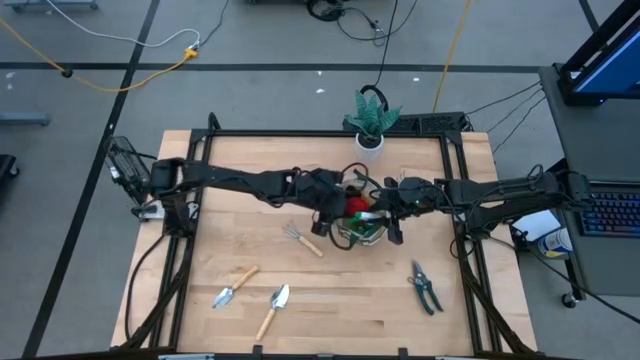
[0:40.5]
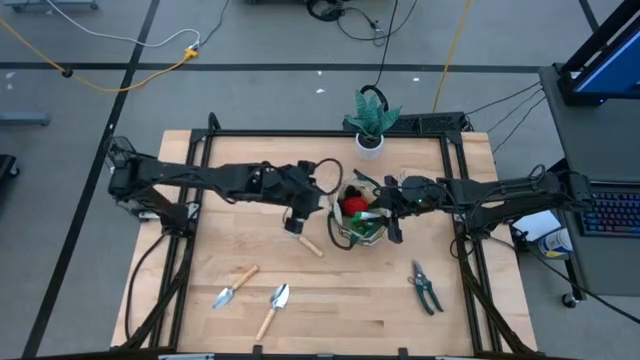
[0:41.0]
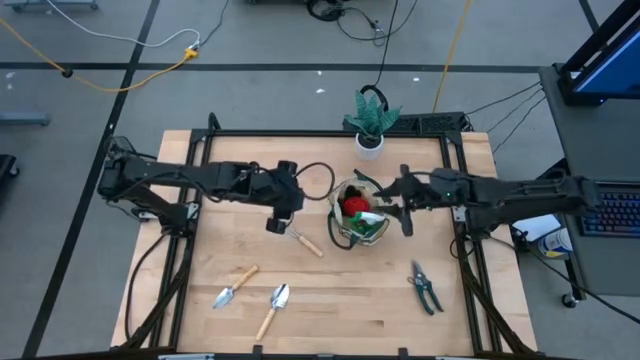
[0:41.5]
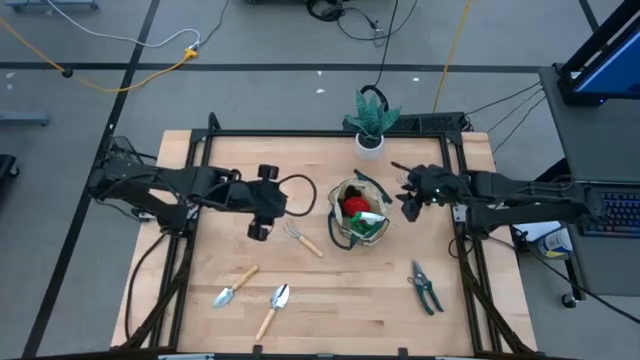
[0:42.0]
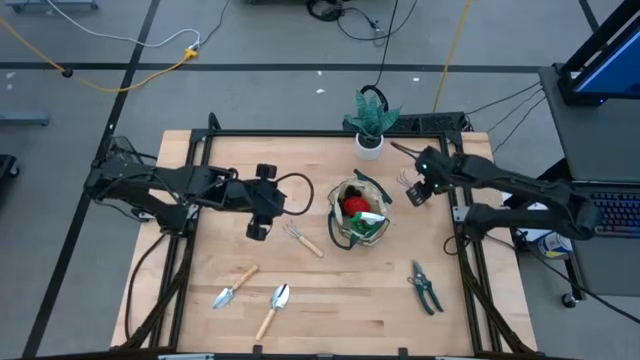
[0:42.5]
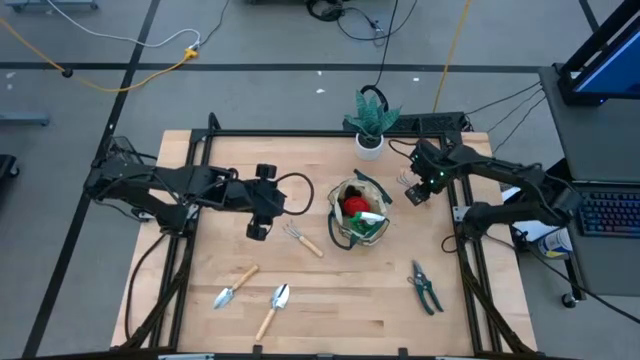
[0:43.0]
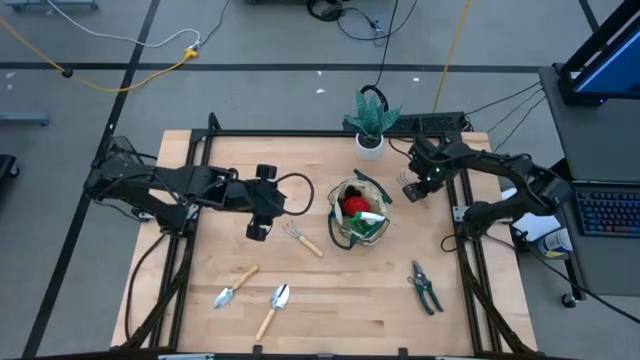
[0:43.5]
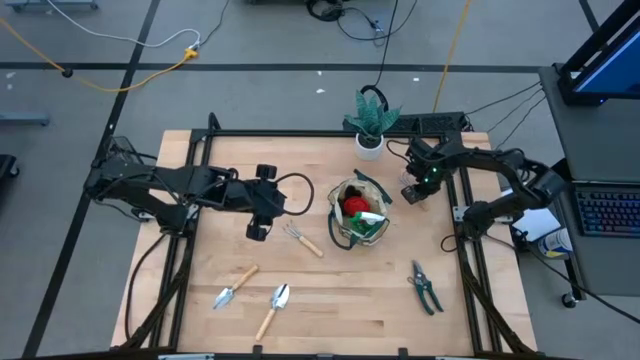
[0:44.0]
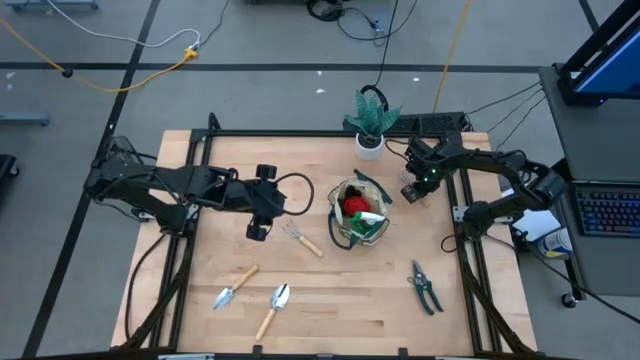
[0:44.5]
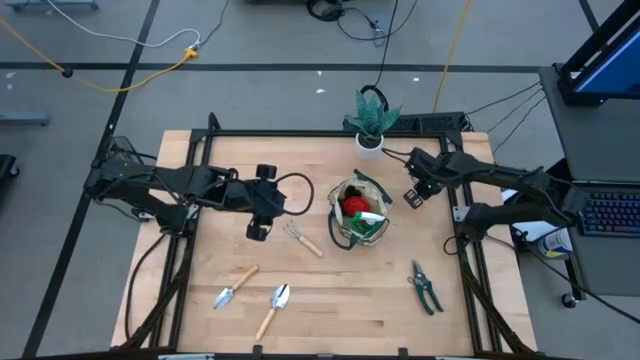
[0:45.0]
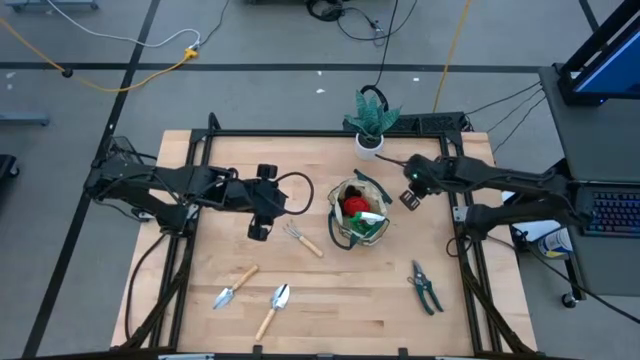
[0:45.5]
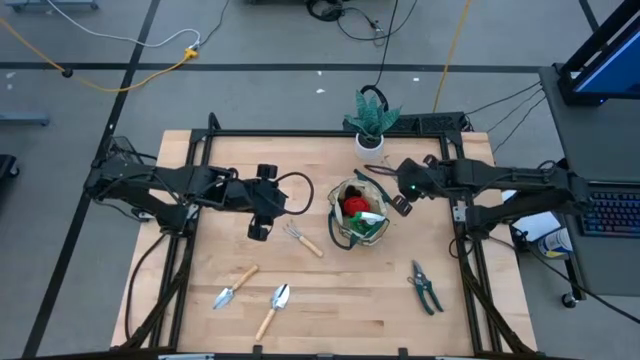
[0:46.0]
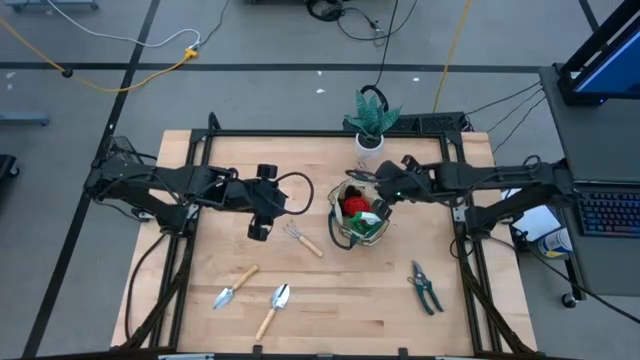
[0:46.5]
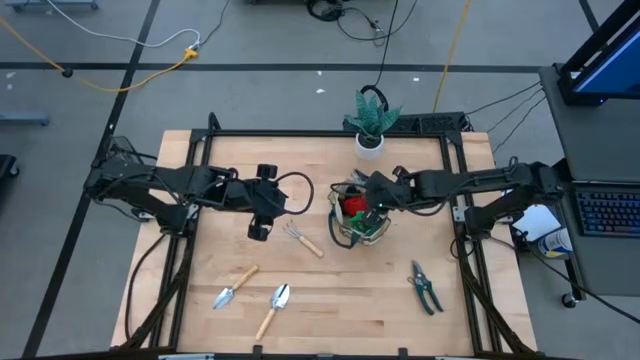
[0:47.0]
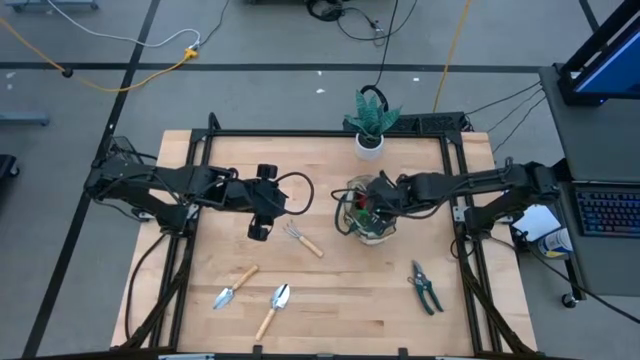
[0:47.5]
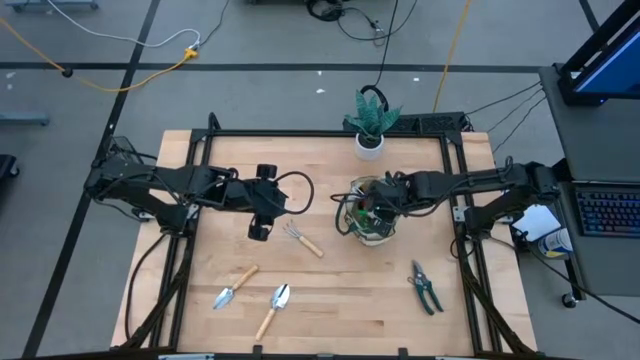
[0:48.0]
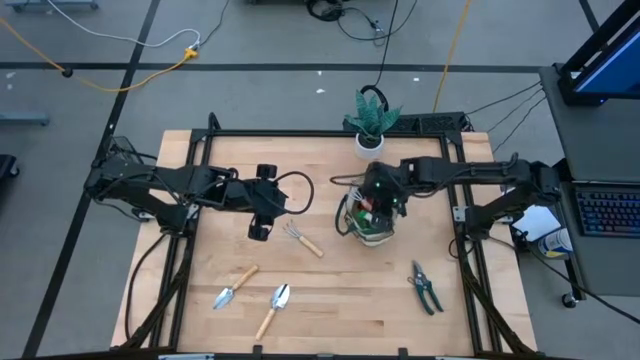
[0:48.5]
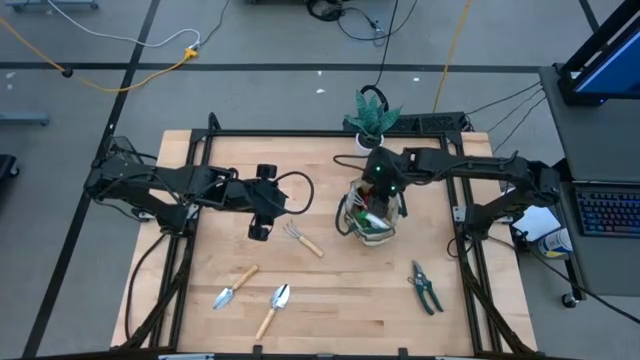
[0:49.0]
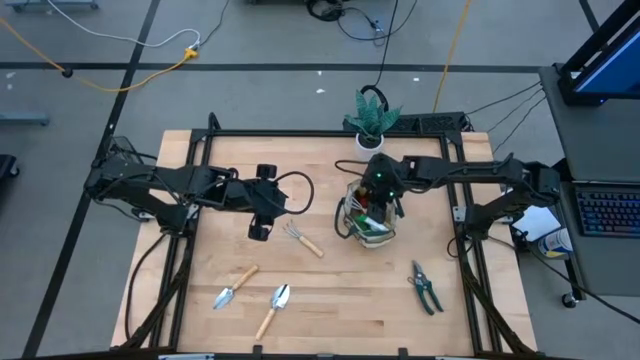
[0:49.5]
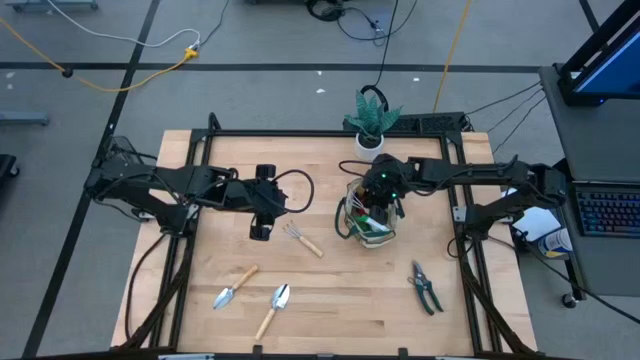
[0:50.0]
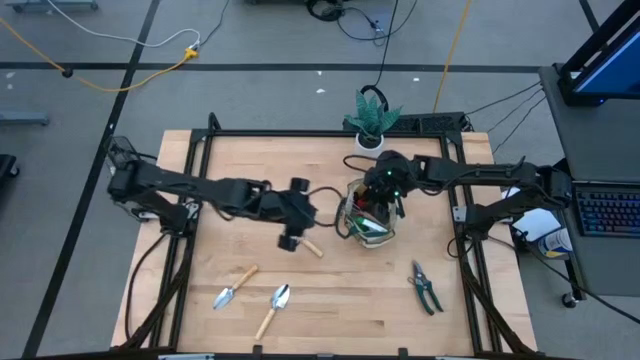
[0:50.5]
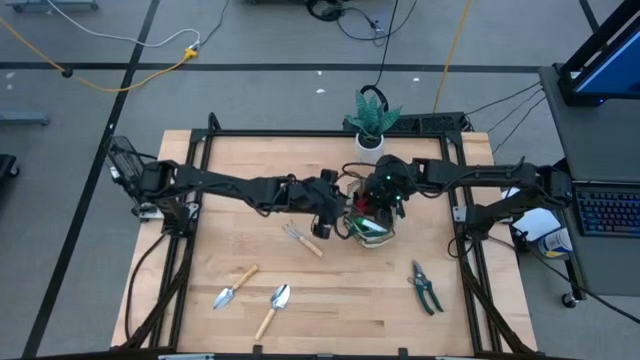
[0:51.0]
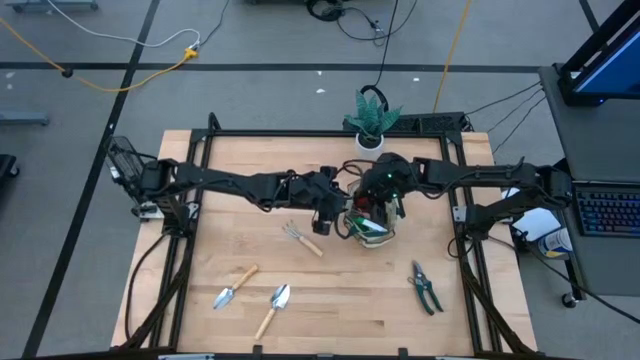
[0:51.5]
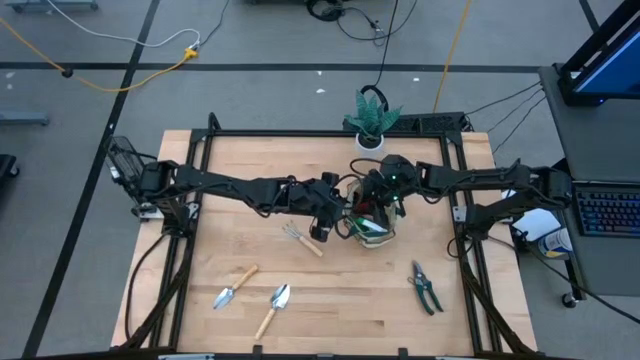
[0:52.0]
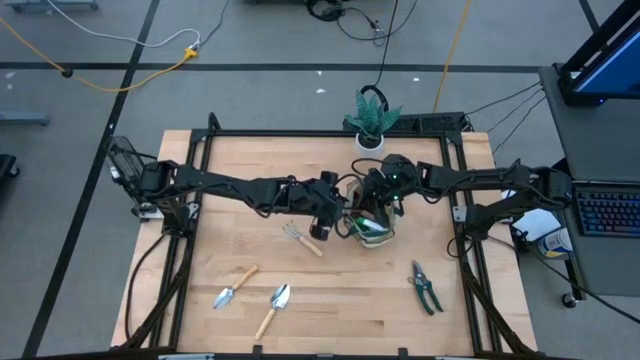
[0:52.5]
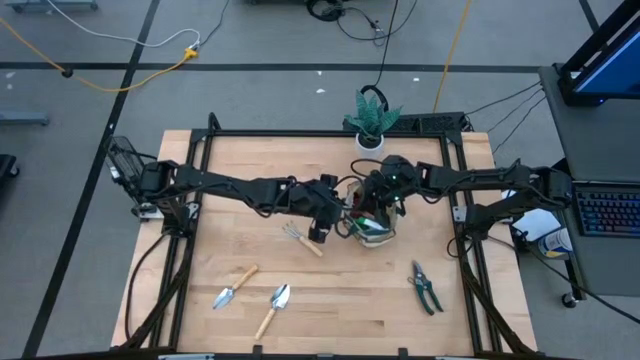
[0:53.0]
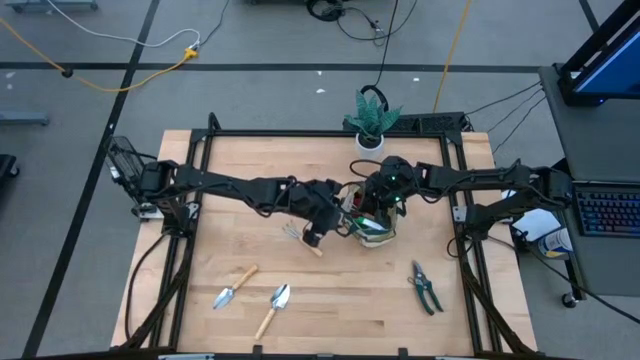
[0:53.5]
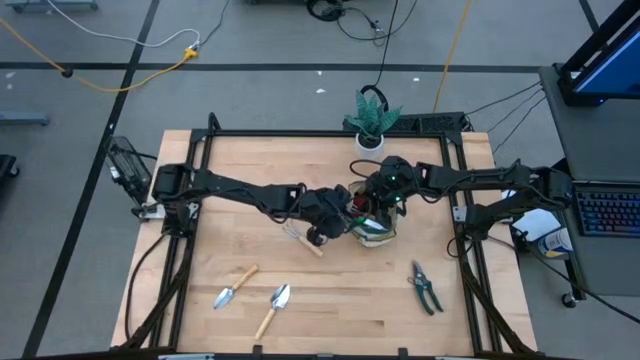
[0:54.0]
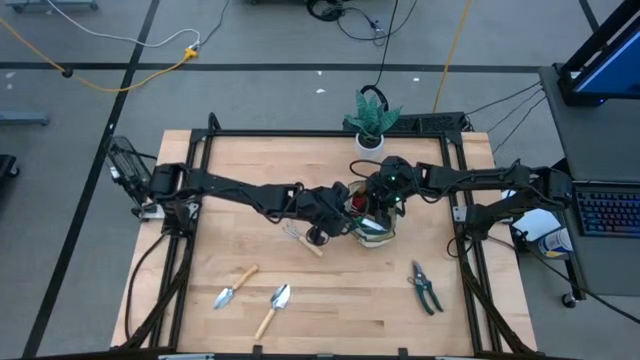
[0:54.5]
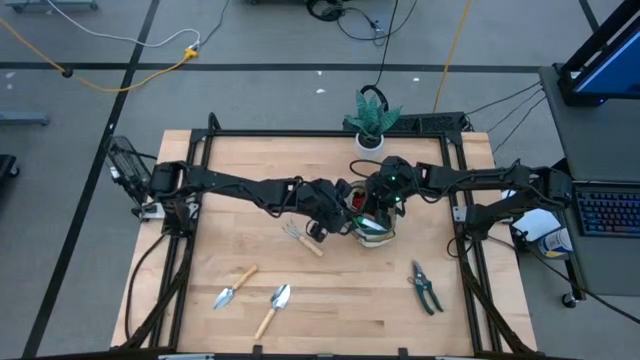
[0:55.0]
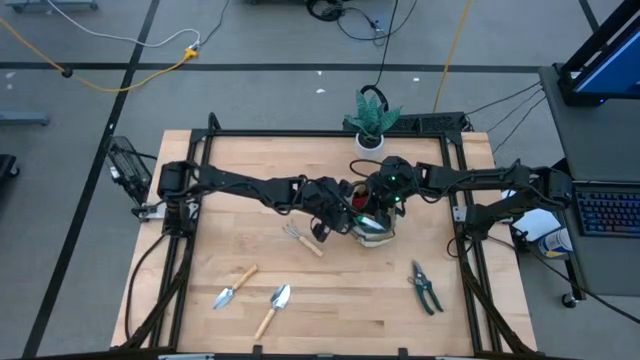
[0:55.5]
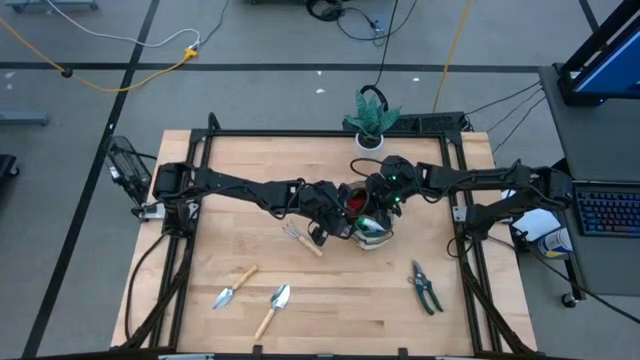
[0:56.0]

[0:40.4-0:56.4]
Task: Pick & Place Garden tools in Gardening bag
Put the right brown hand rake into the gardening bag

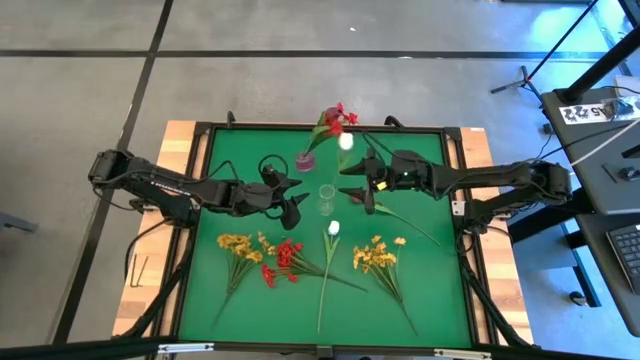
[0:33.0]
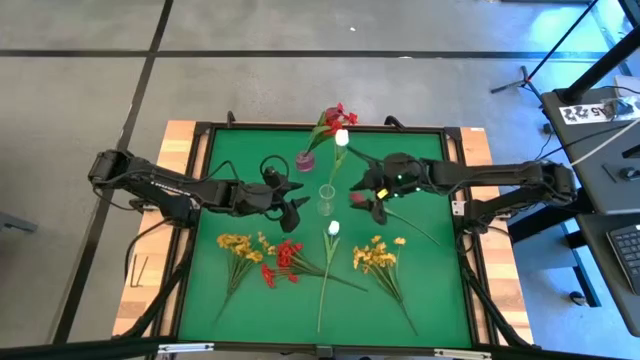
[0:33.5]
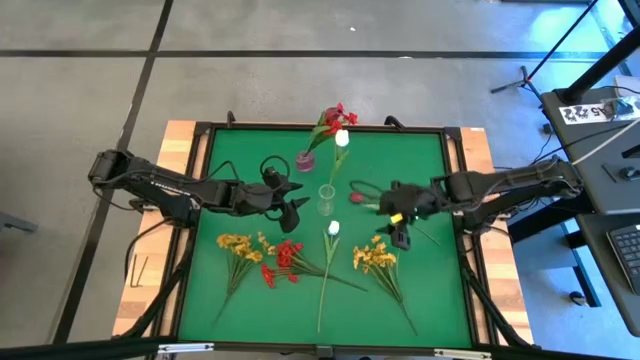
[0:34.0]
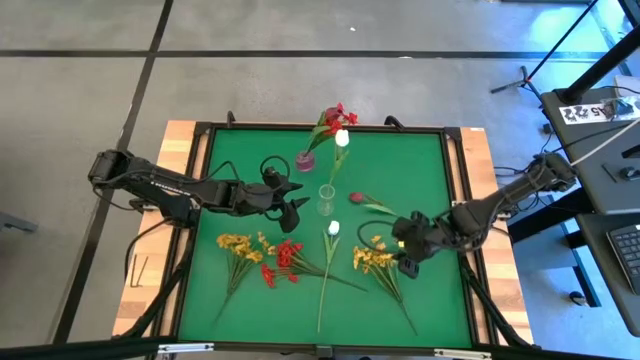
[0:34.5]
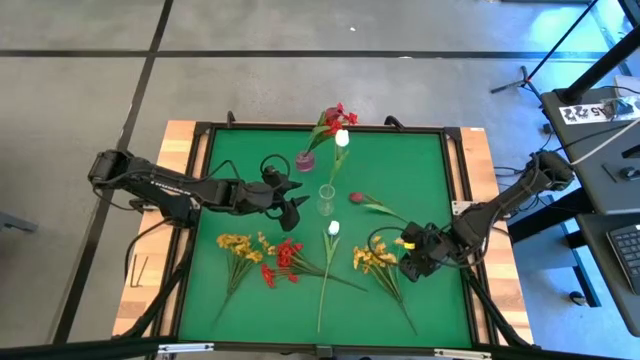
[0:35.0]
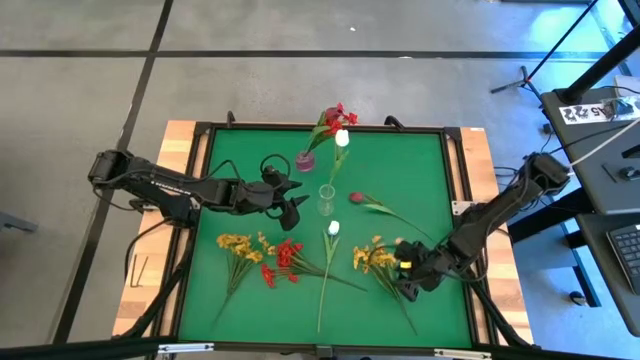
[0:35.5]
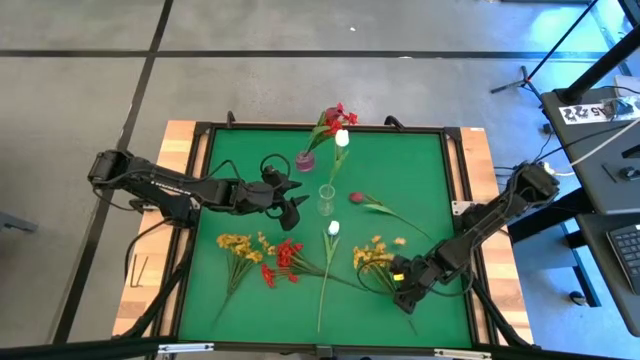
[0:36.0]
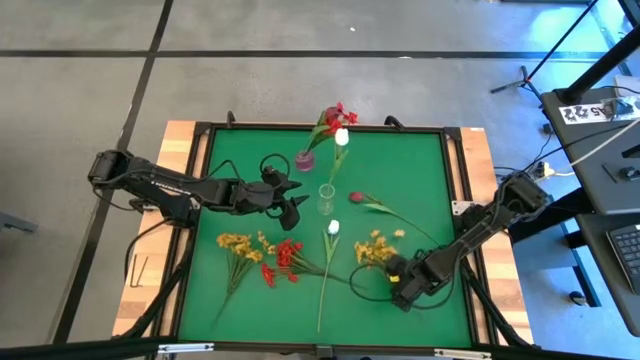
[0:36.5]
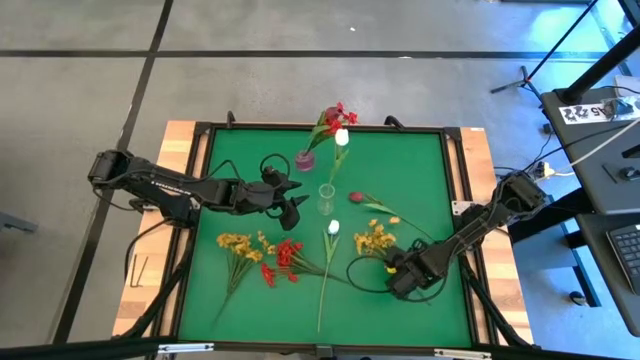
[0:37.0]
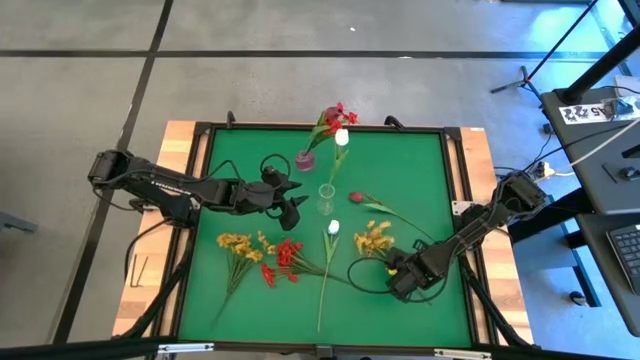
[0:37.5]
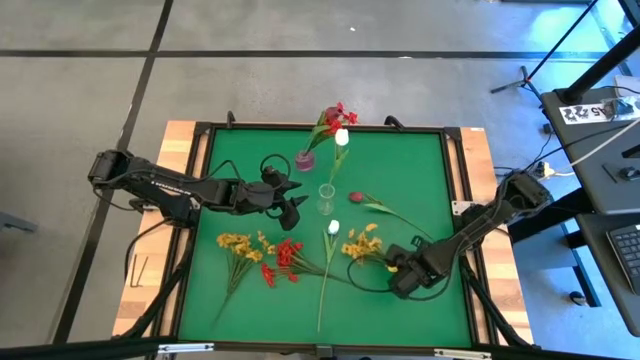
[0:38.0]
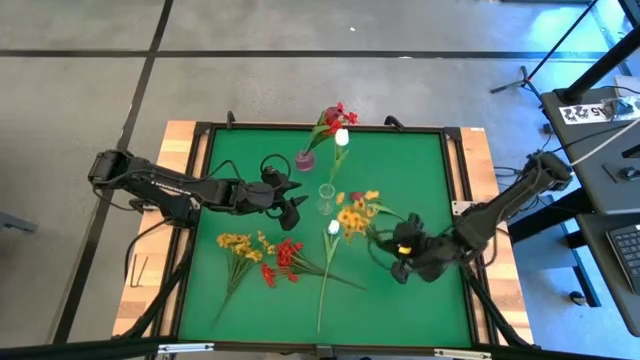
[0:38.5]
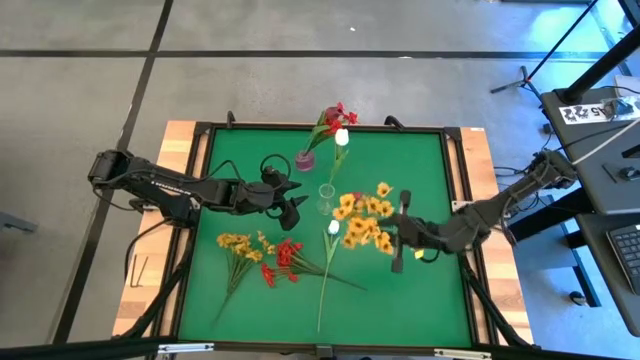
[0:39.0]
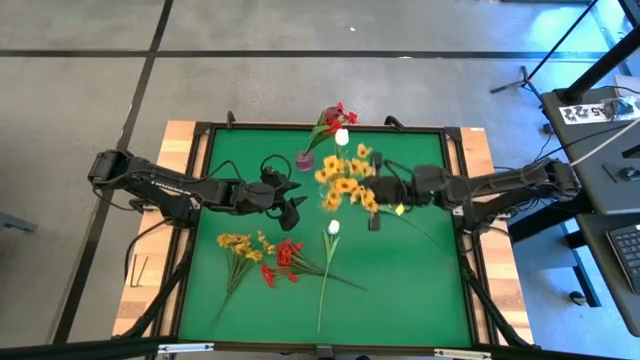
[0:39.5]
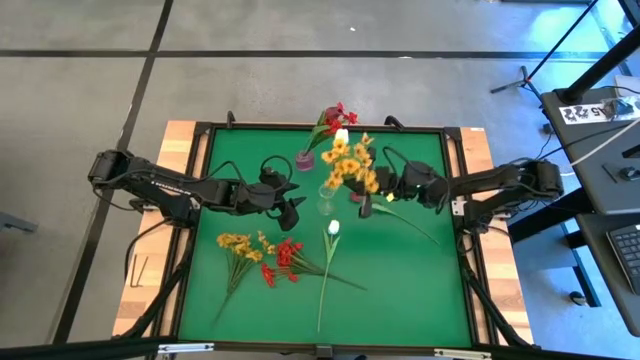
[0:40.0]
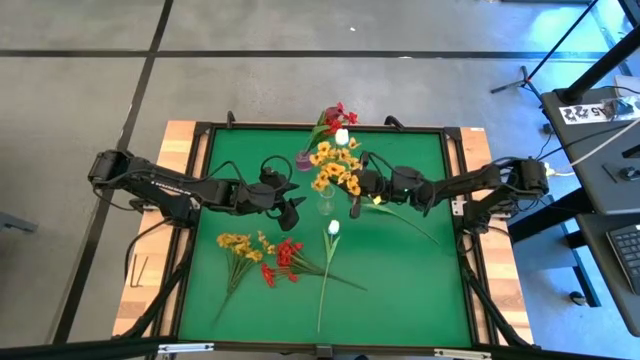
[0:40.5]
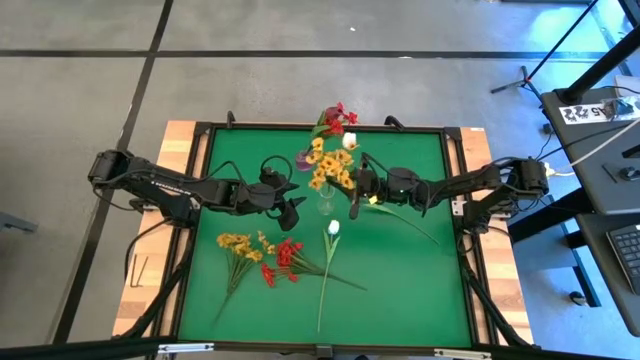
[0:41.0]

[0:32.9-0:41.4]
Task: Sort flowers into vase by color
Put the right yellow flowers into the transparent vase
